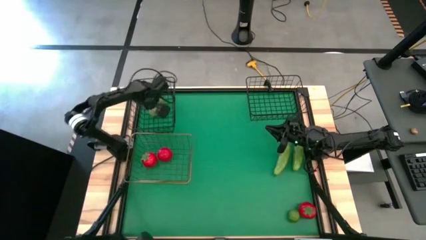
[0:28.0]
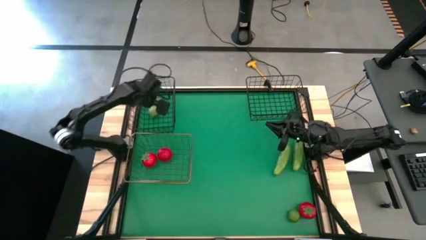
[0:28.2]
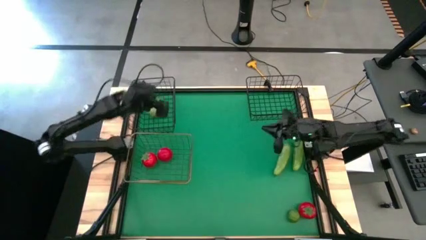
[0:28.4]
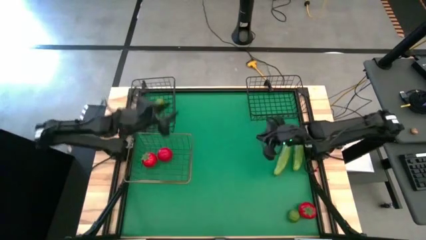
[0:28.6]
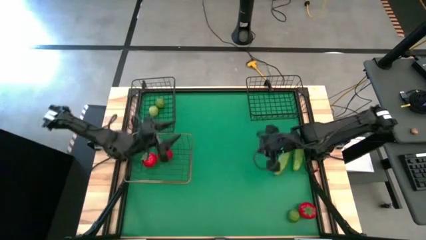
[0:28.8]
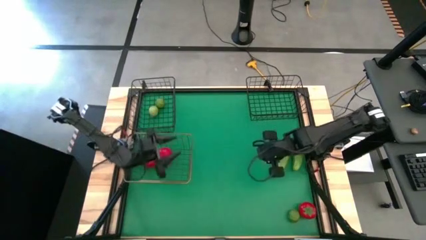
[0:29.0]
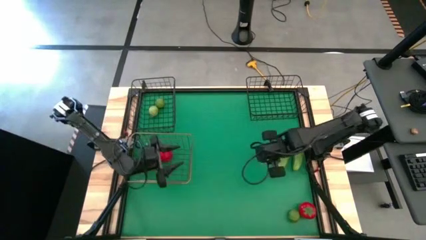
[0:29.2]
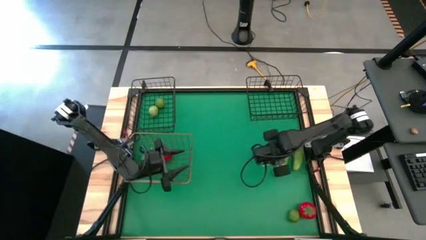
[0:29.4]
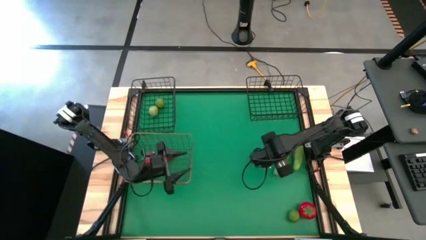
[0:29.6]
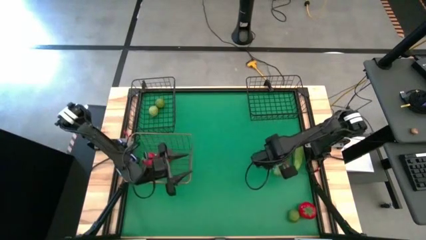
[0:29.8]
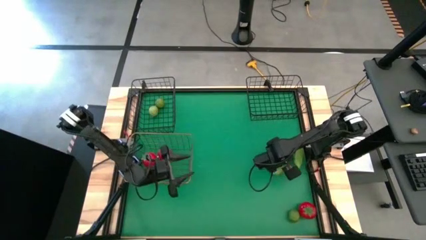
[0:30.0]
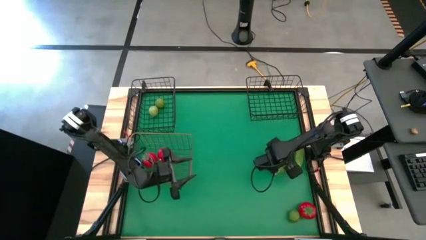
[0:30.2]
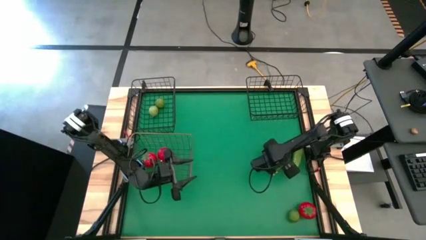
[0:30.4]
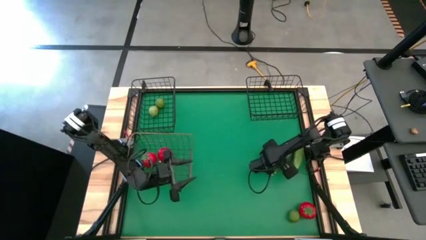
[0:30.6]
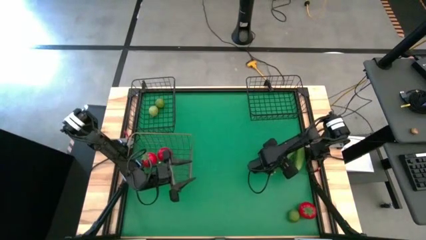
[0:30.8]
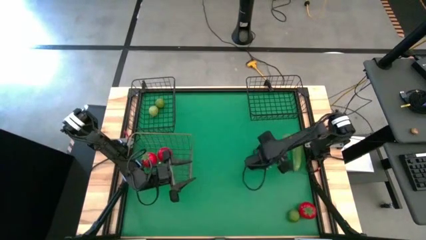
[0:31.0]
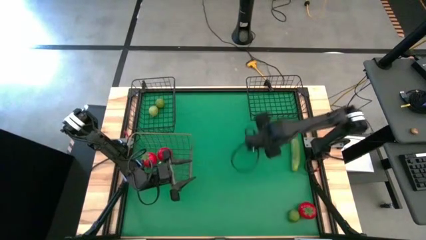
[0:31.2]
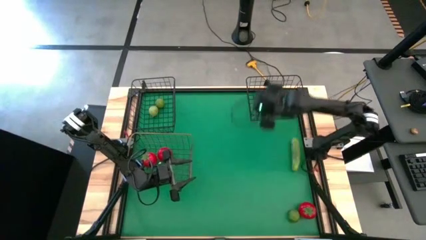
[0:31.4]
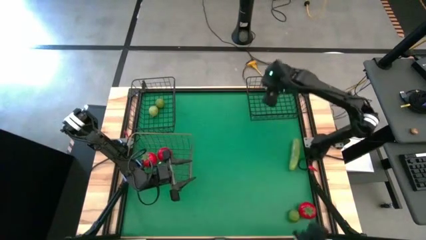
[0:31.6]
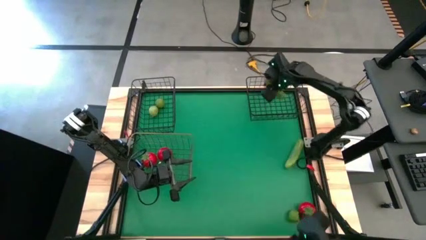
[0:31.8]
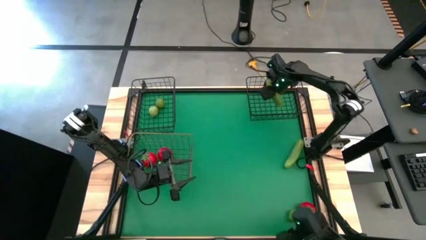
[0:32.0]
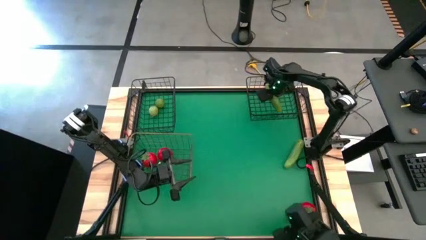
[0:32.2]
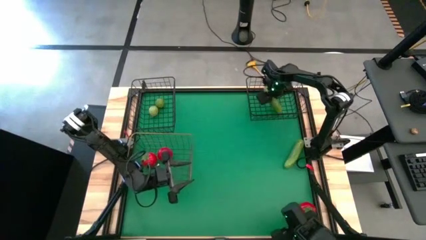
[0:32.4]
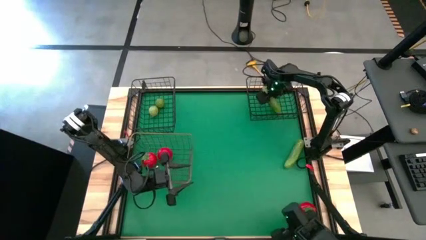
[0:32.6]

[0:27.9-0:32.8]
Task: Sort produce into baskets
Put the left cucumber into the right black wire basket

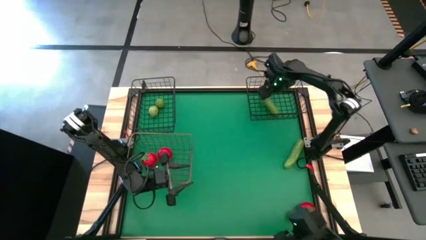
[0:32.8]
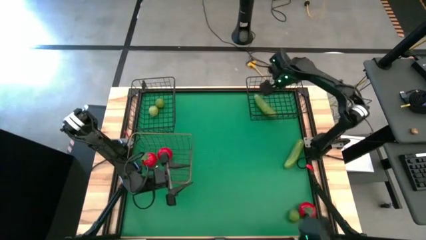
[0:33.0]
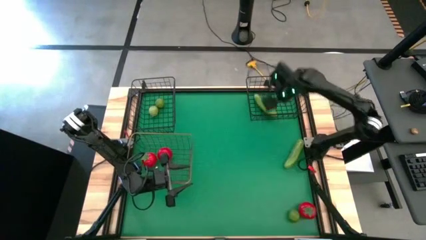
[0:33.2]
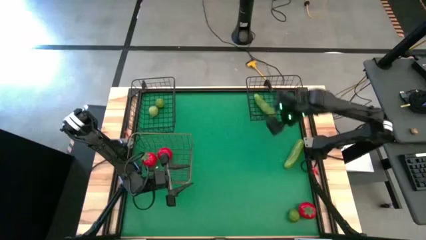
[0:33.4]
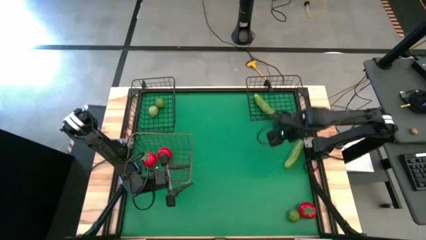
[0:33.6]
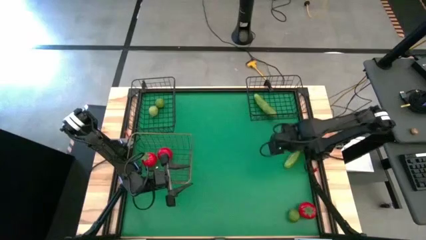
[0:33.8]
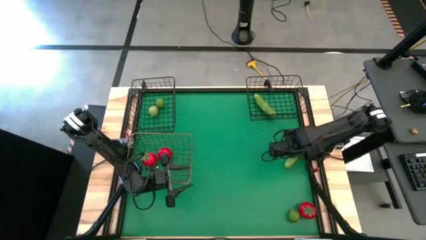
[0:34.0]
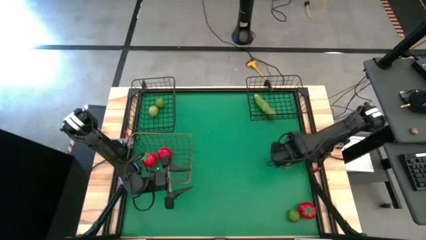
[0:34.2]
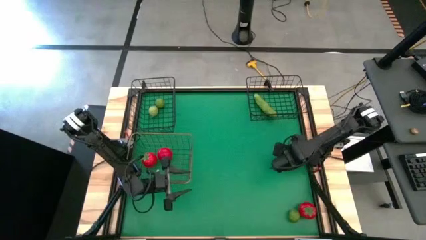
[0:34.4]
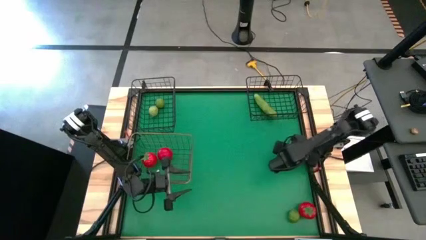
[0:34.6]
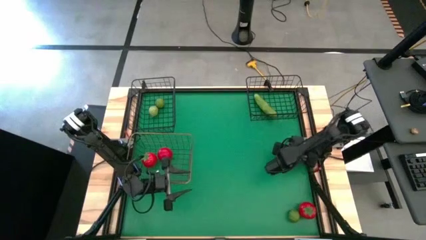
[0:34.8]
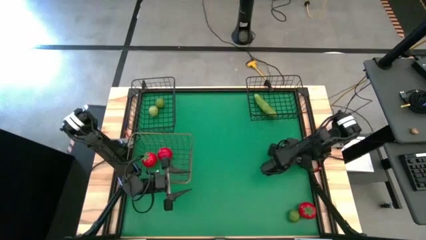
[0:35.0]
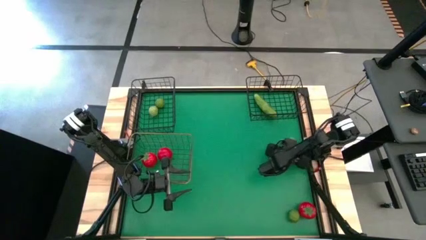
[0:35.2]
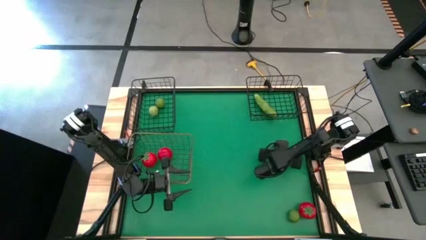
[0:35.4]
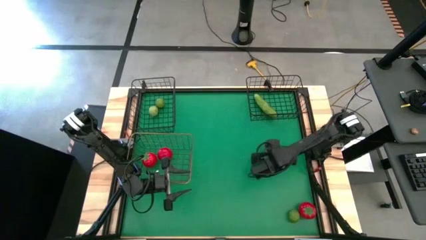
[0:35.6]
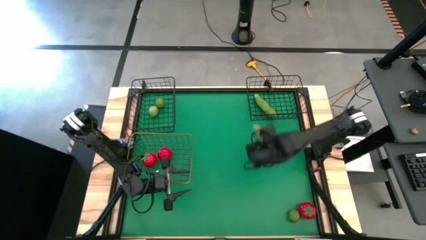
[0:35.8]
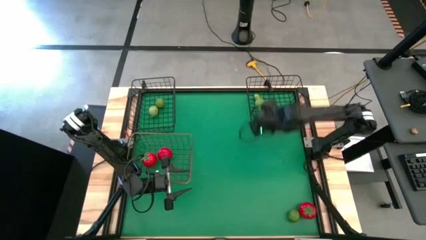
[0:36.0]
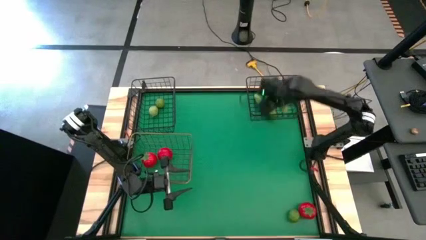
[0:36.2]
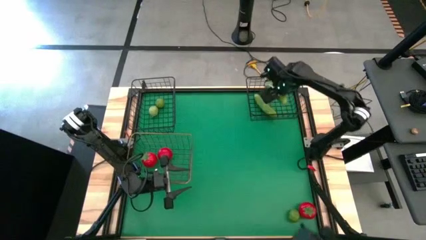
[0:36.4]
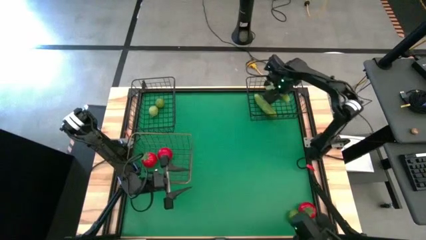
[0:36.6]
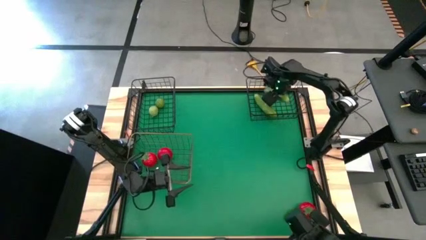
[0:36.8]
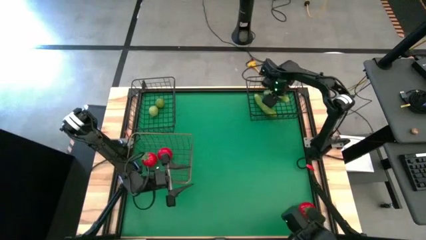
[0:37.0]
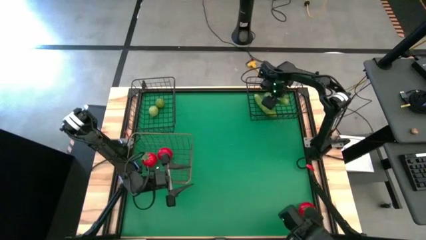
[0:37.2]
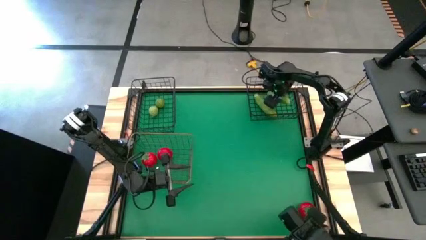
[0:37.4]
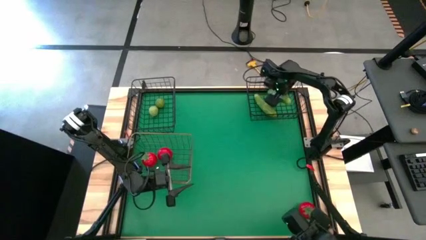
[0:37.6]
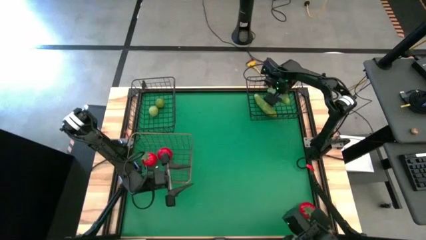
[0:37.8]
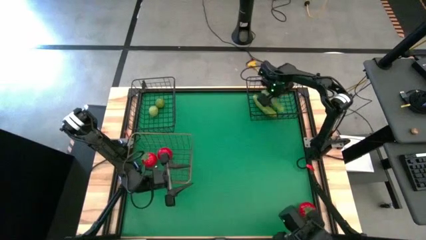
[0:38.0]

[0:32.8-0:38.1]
Put the cucumber into the right black wire basket

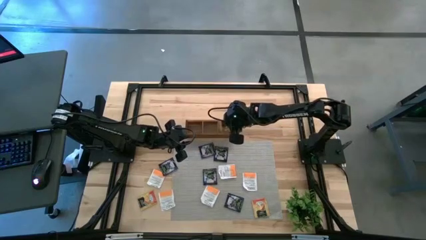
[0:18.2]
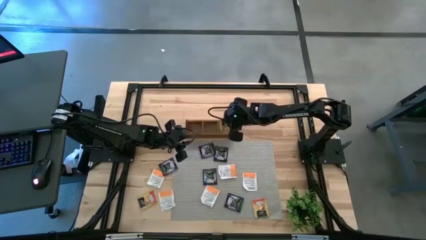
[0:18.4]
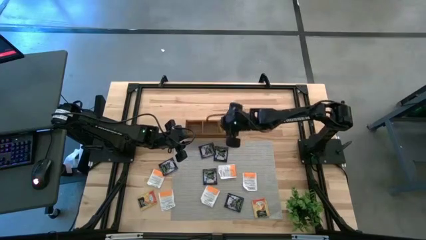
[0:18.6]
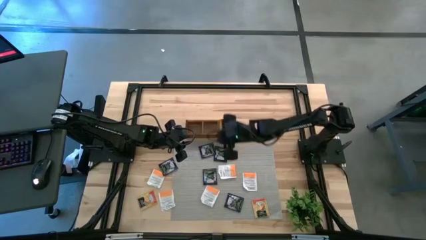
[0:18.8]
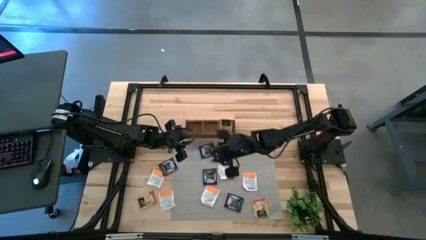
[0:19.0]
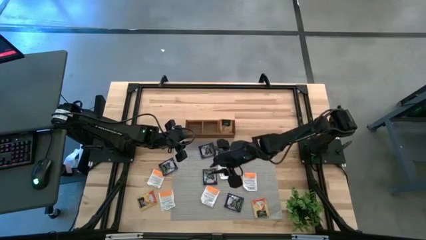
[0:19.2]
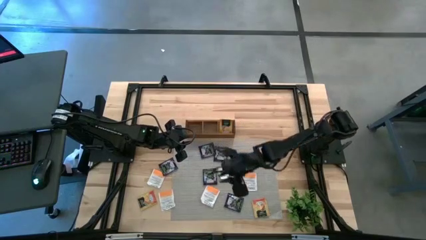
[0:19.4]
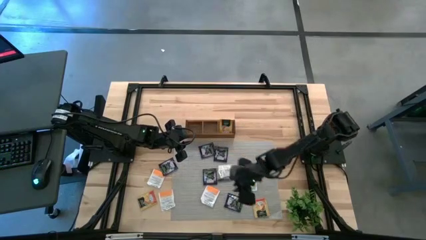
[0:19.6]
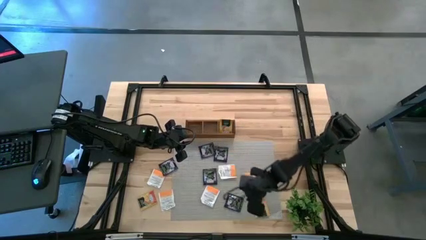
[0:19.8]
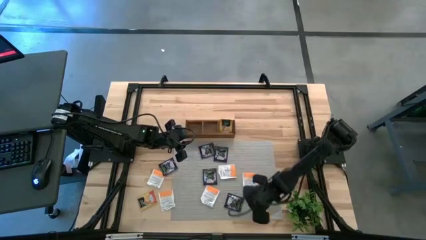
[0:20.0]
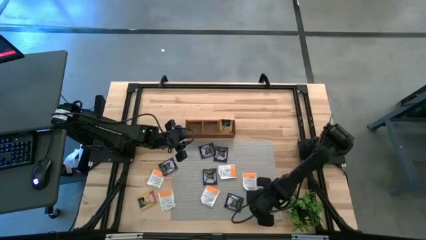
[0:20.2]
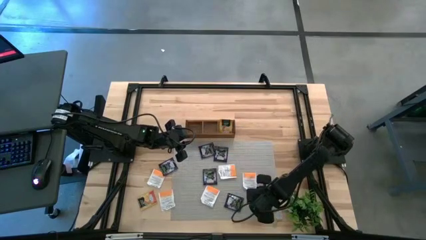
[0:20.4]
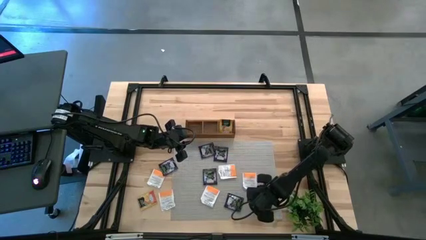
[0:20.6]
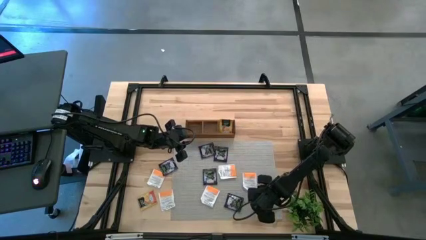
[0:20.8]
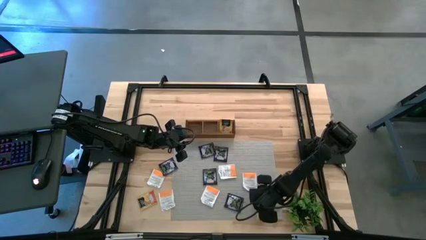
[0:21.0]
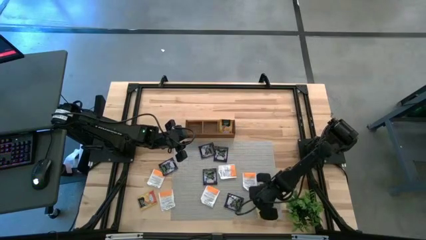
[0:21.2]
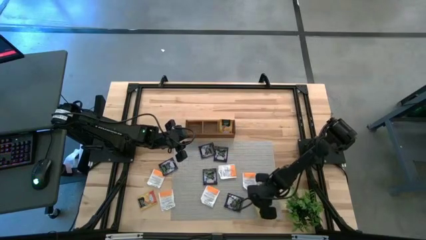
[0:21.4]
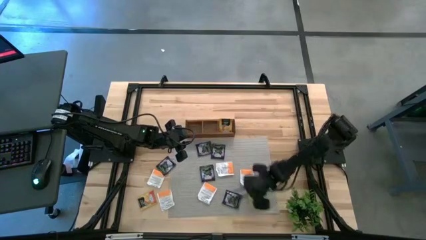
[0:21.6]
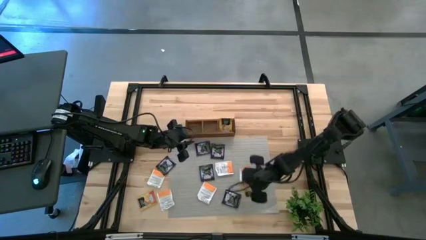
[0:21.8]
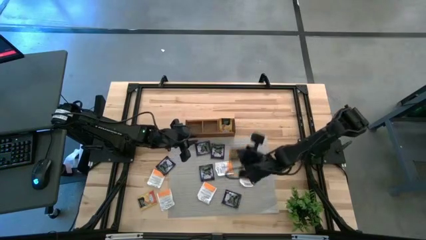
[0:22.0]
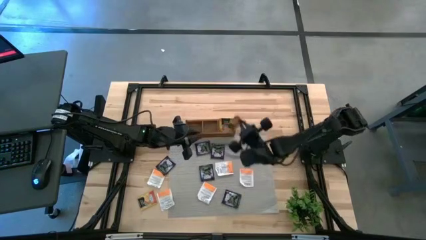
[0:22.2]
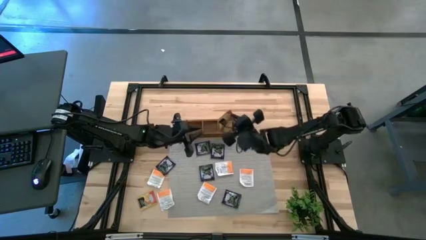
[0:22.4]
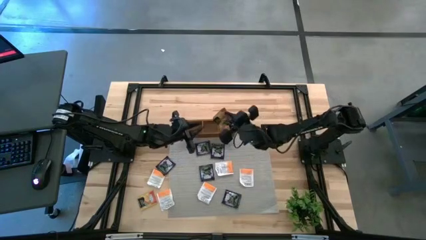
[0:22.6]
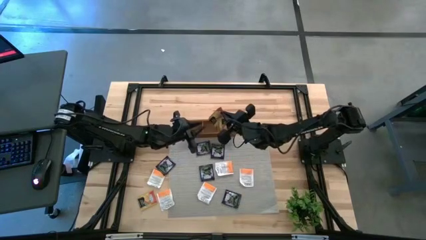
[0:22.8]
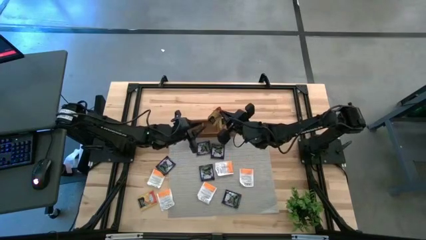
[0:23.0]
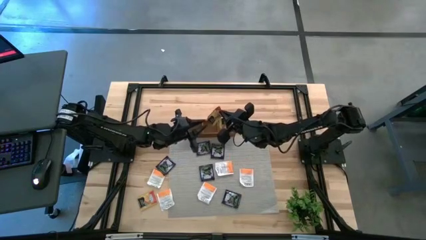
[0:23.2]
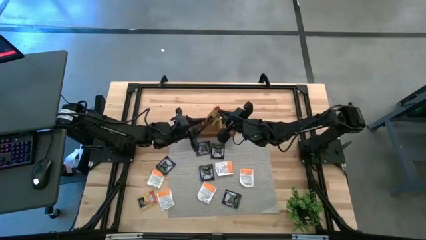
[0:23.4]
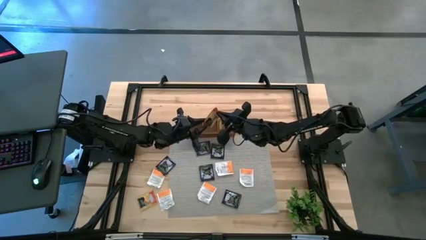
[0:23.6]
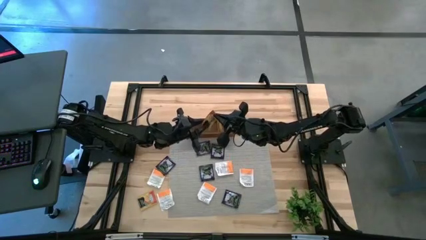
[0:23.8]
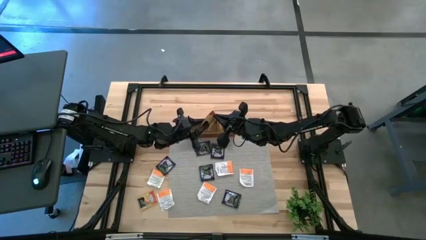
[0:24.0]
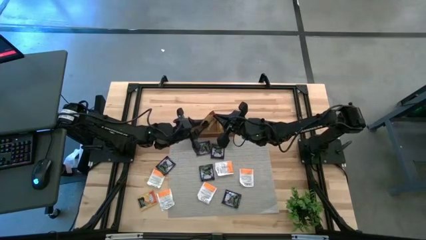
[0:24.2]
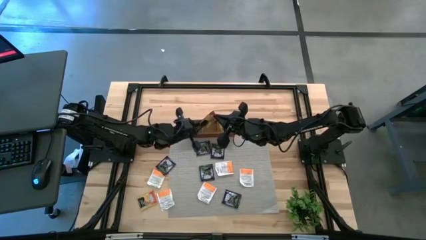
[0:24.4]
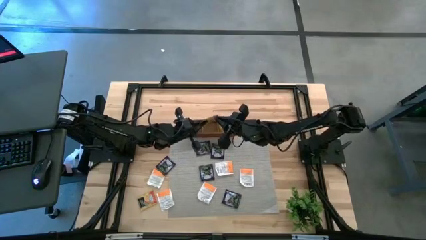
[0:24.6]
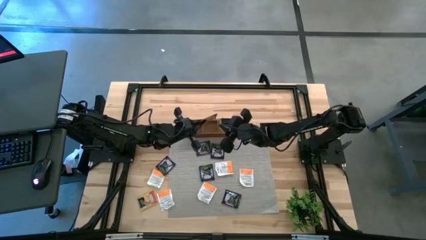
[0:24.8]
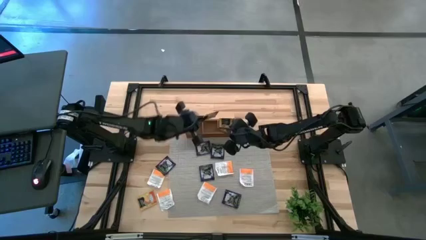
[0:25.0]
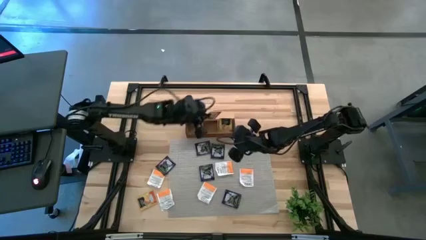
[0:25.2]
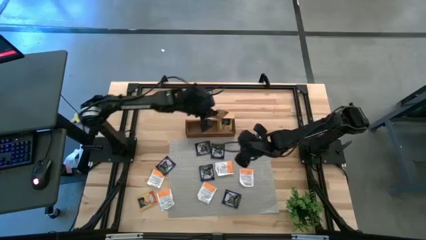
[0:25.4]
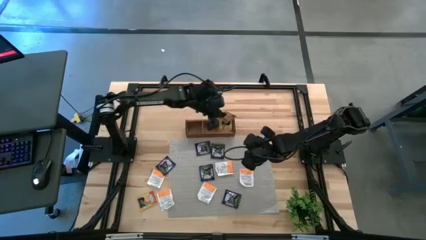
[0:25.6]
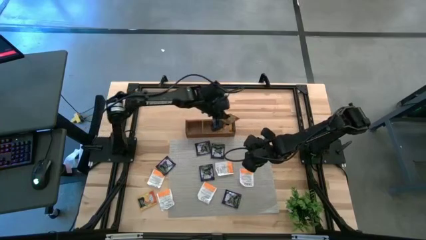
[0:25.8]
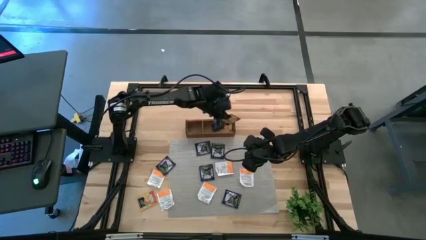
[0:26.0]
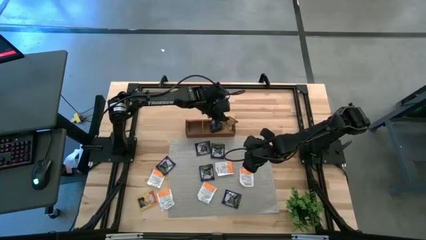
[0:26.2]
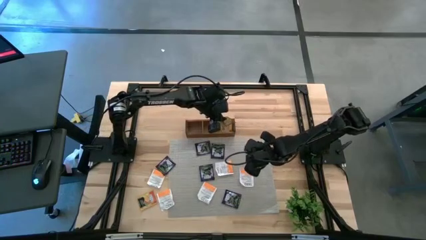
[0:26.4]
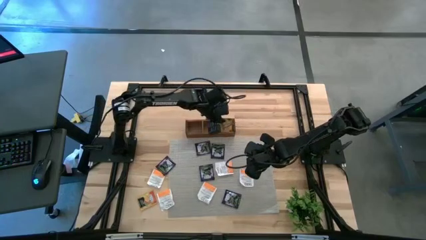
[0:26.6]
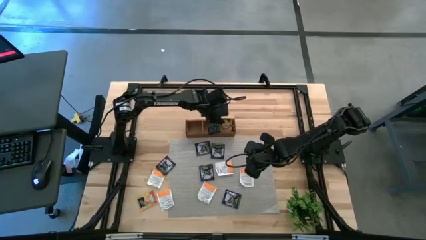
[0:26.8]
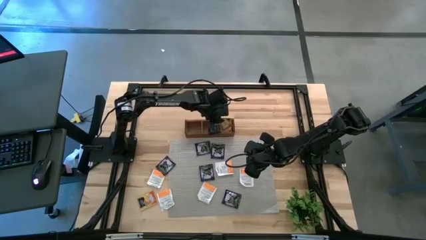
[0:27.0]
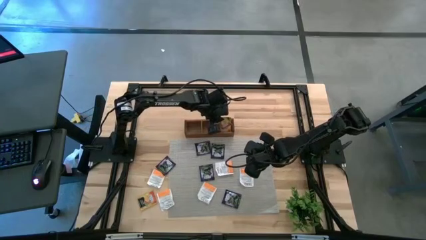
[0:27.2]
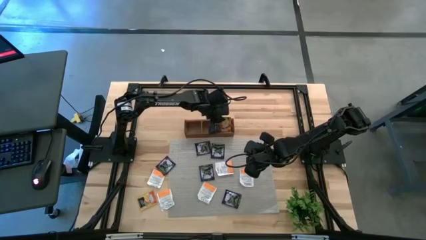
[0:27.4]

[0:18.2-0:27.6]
Task: Pick & Place Tea
Put the orange tea bag into the right section of the wooden organizer
